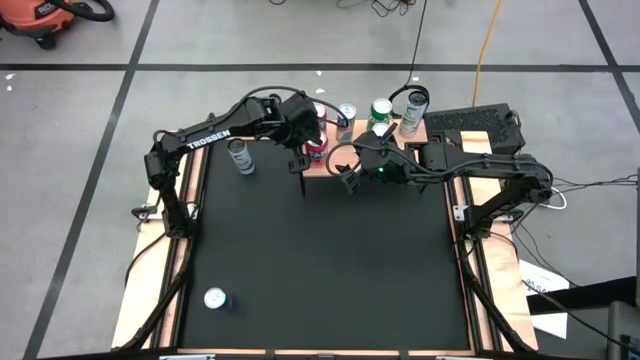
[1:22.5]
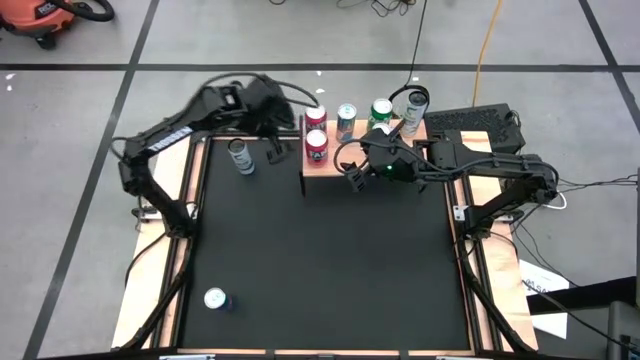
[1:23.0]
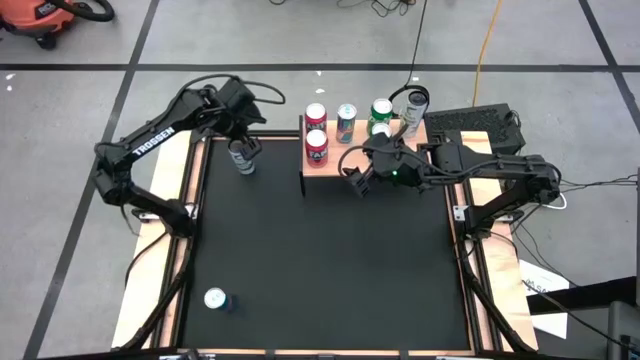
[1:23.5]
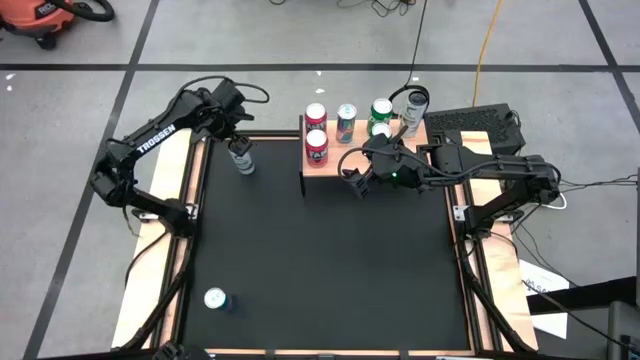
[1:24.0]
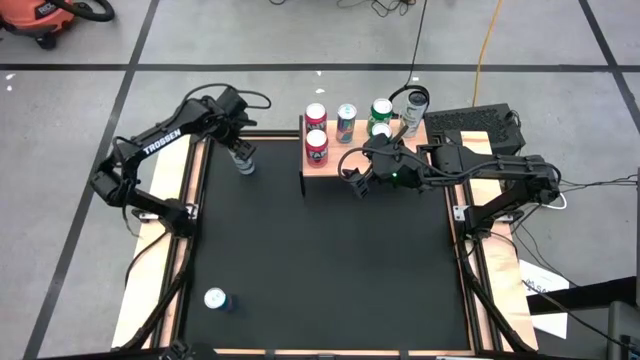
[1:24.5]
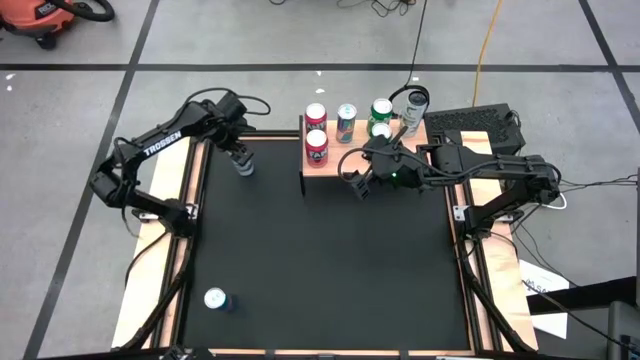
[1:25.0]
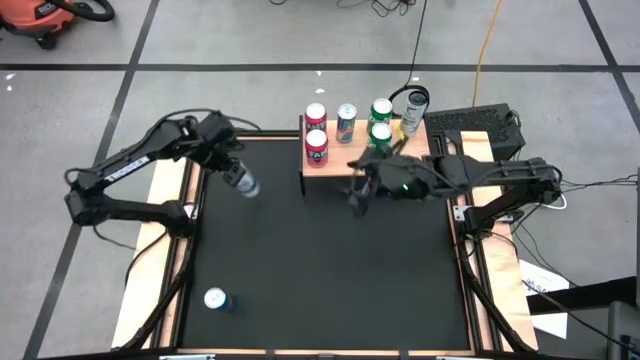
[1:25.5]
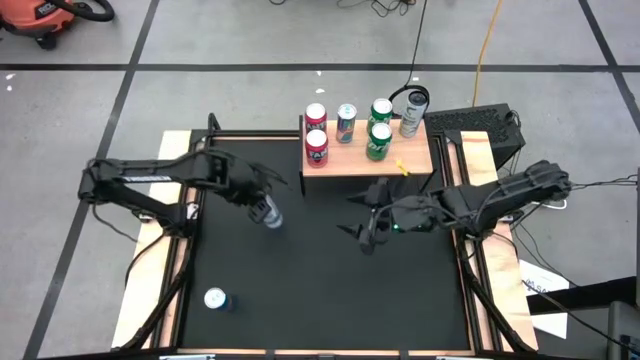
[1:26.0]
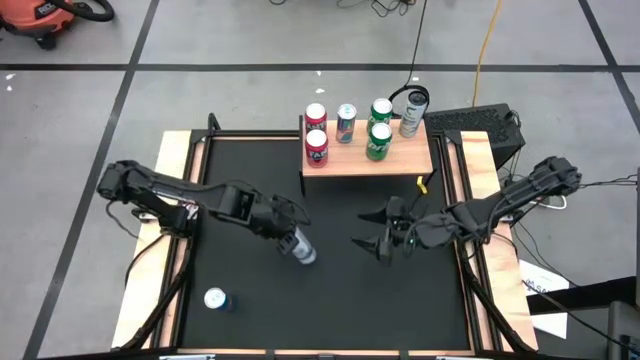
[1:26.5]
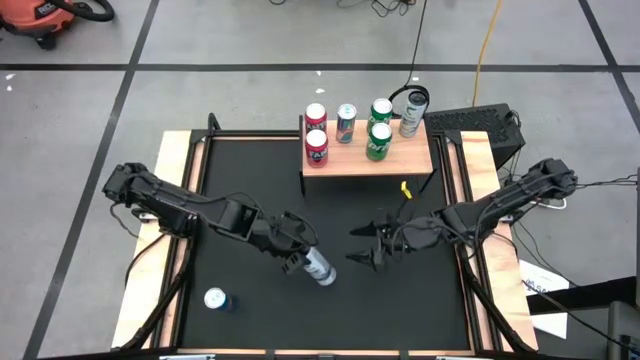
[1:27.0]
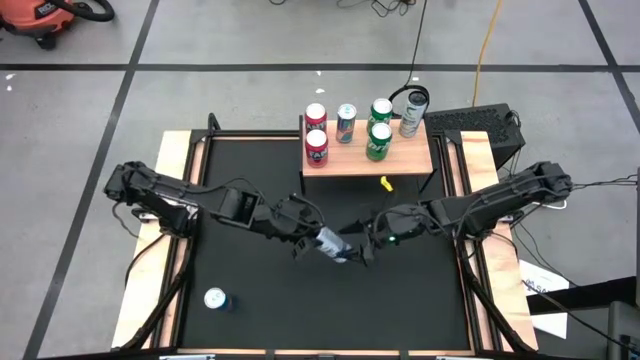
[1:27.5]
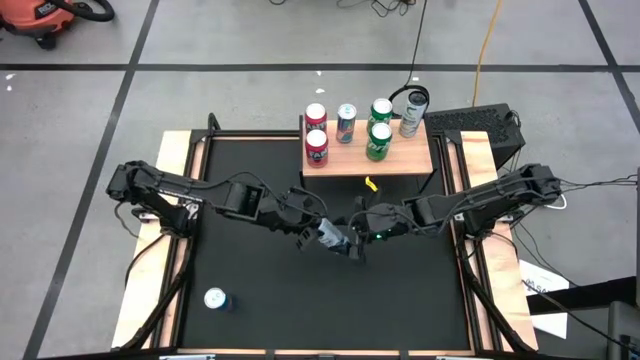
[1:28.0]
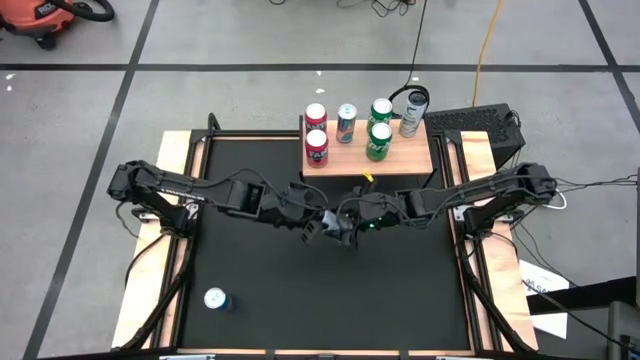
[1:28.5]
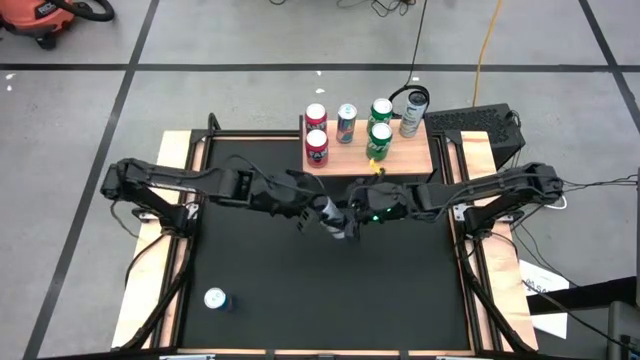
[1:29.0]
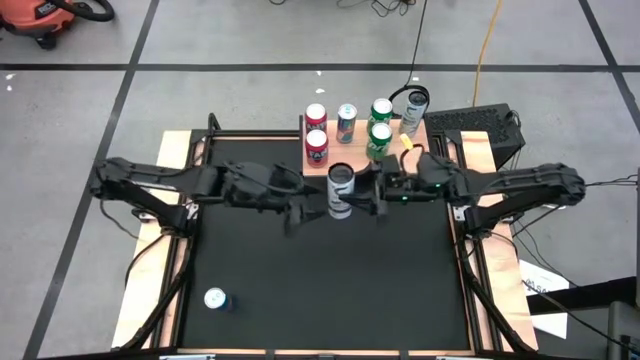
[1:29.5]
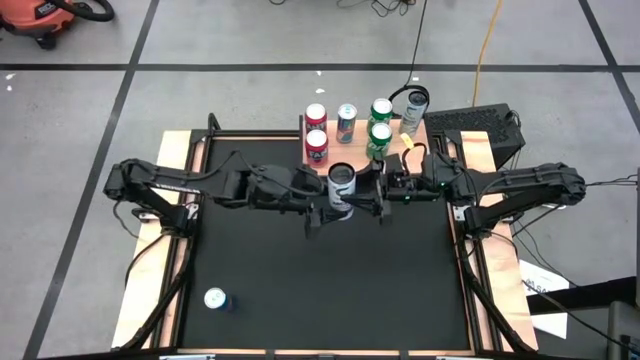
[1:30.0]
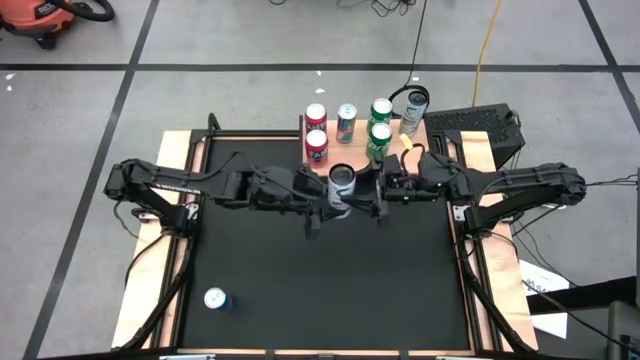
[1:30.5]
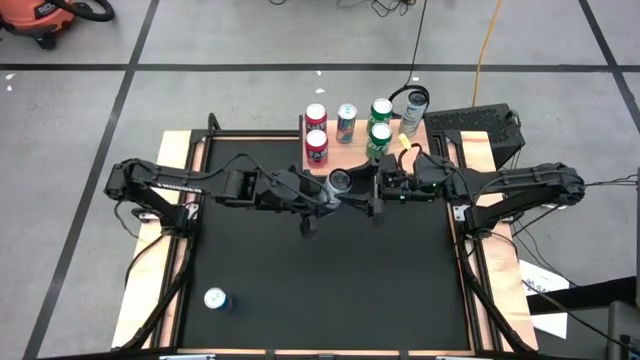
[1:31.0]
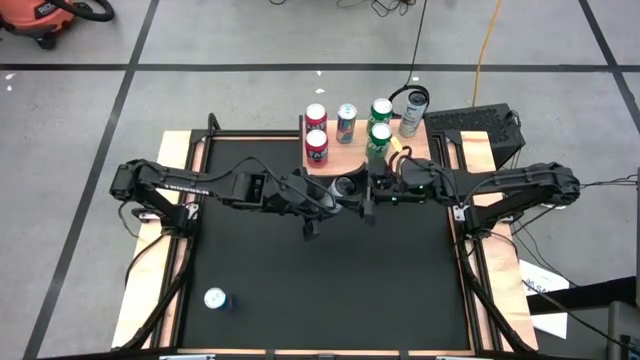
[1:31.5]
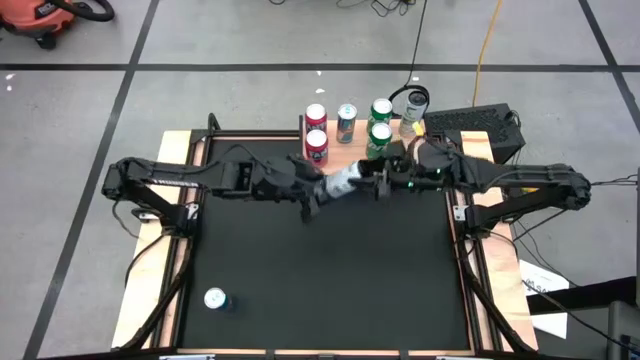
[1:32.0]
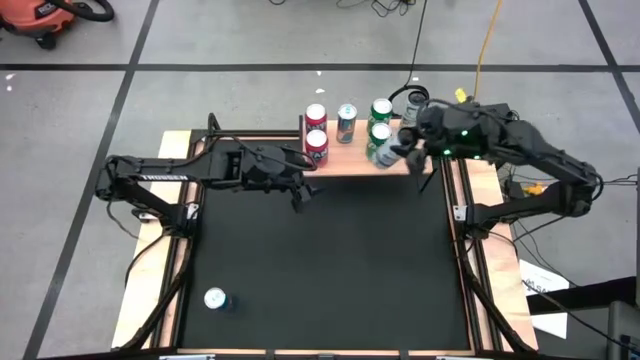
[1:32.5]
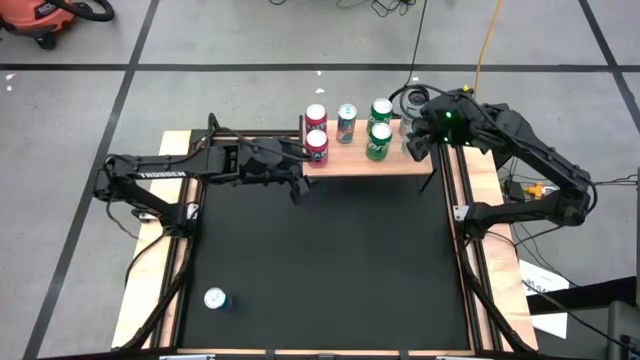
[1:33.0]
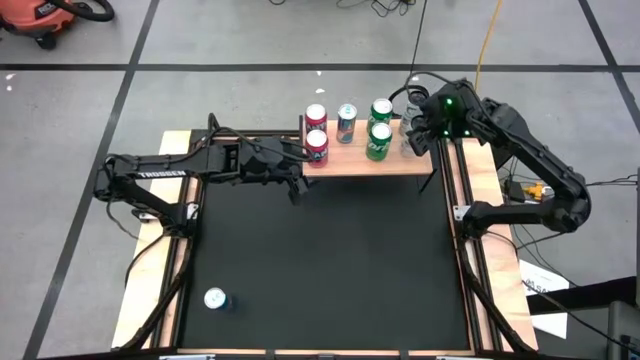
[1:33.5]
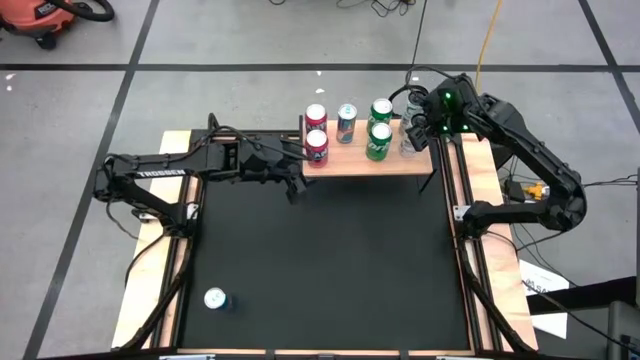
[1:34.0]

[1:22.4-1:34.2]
Task: Place canned beverage on shelf
Put the white blue soda can on the shelf aligned with the other white blue soda can

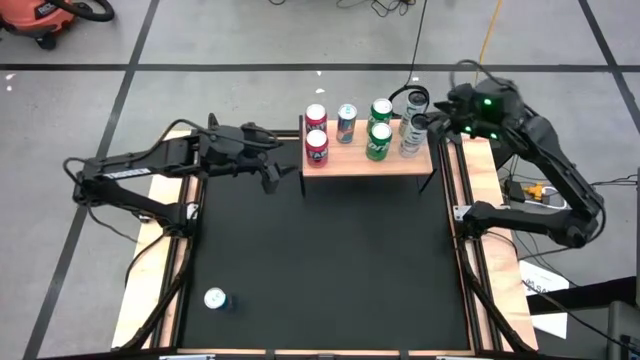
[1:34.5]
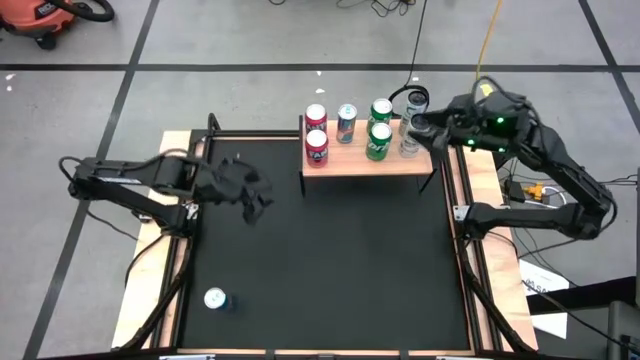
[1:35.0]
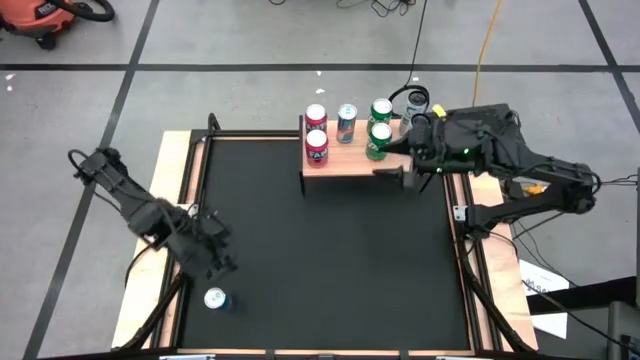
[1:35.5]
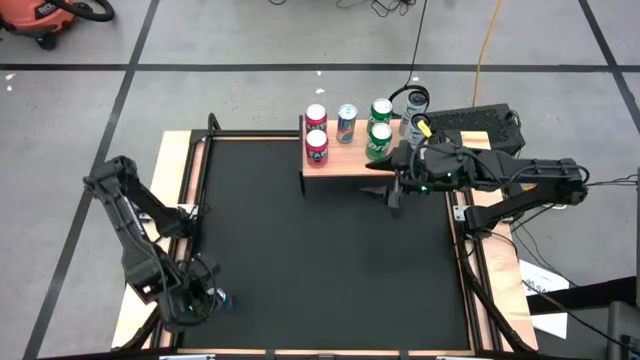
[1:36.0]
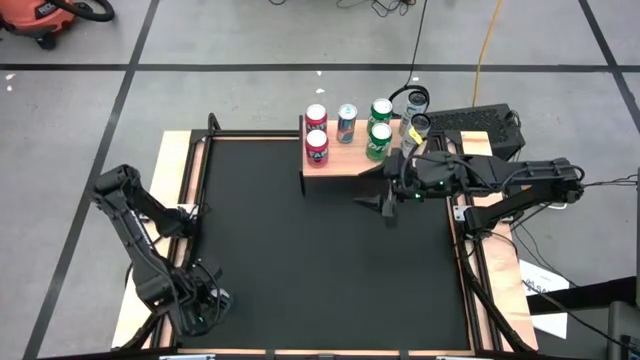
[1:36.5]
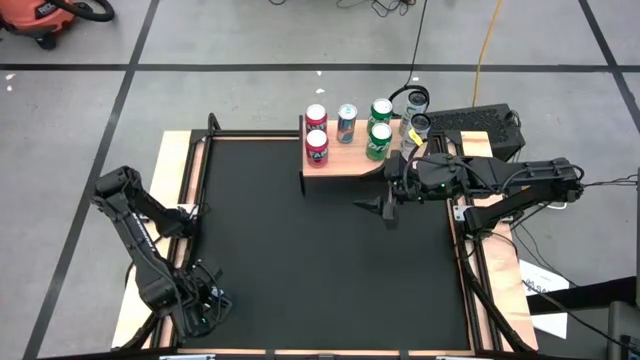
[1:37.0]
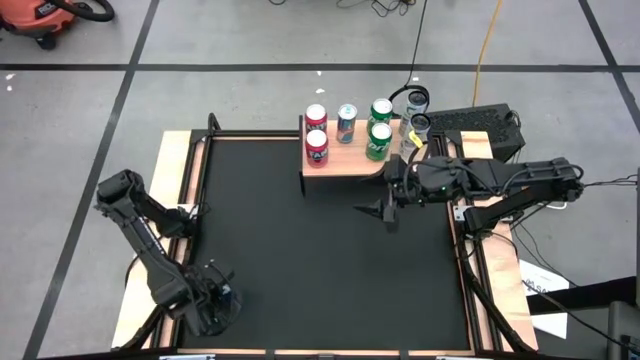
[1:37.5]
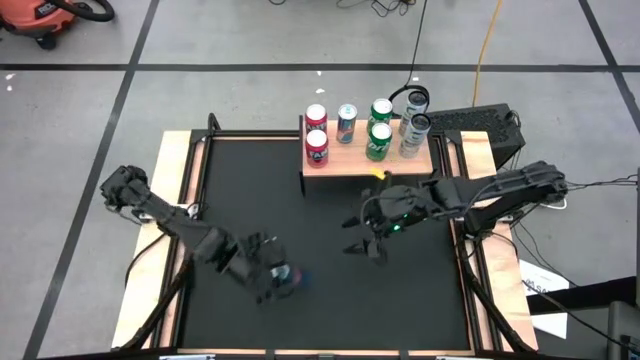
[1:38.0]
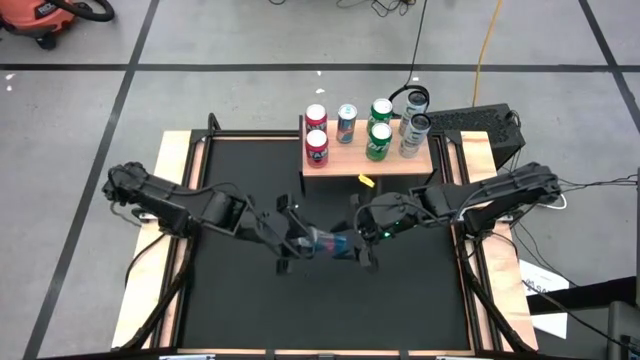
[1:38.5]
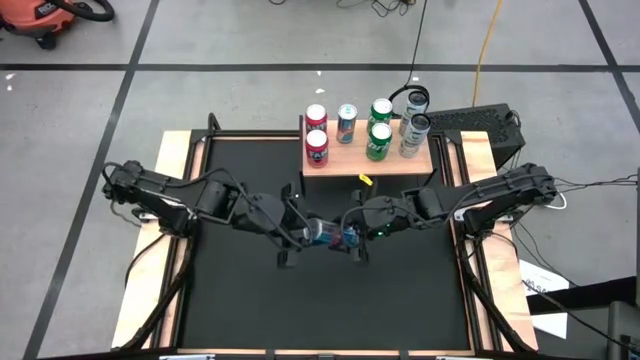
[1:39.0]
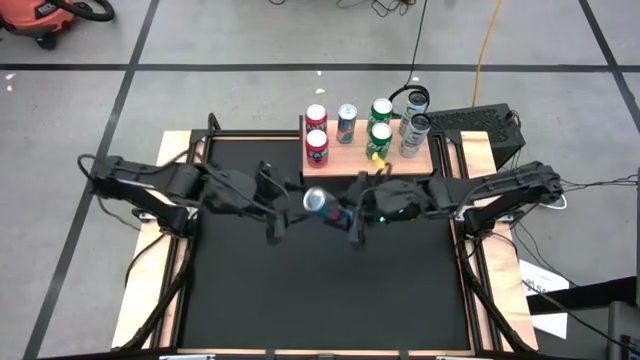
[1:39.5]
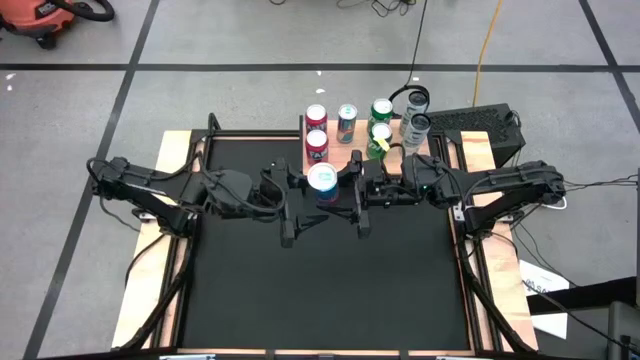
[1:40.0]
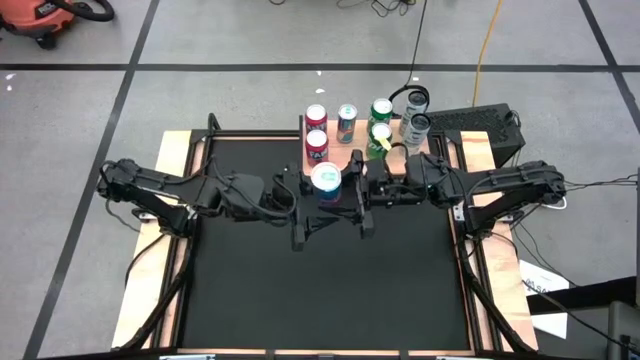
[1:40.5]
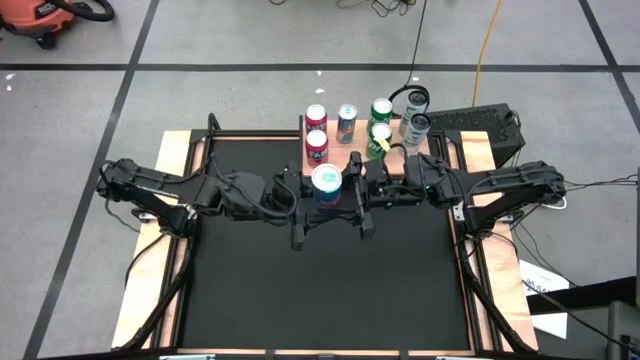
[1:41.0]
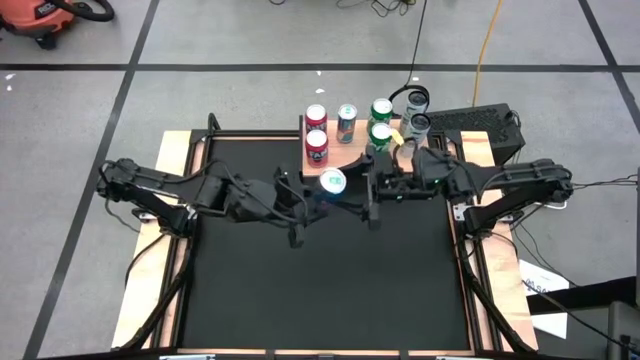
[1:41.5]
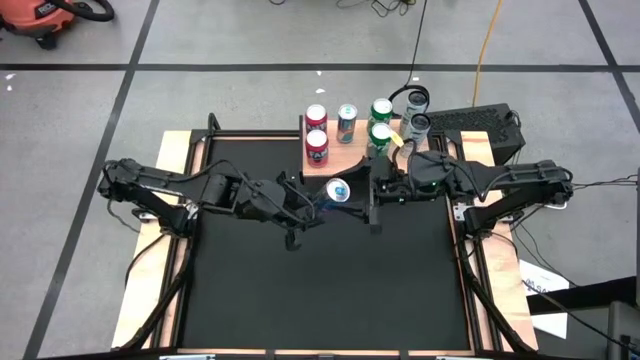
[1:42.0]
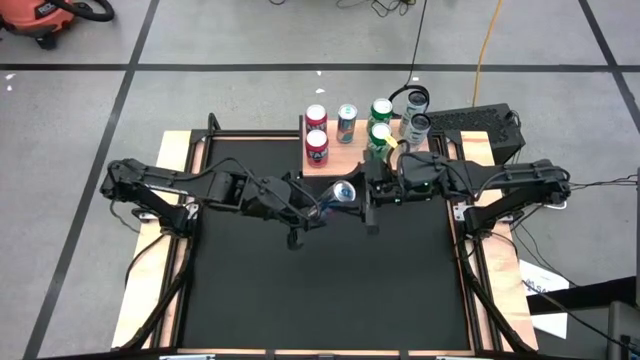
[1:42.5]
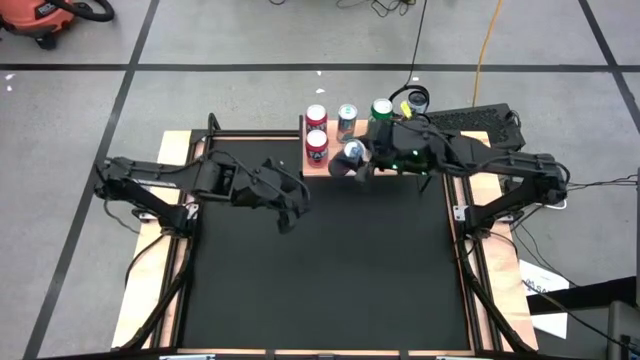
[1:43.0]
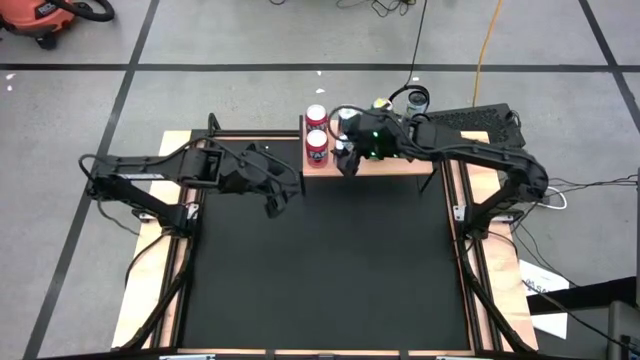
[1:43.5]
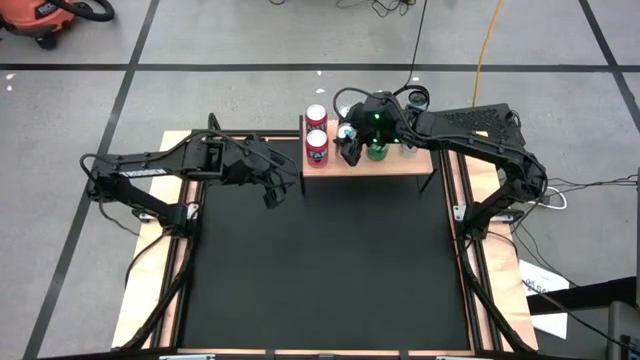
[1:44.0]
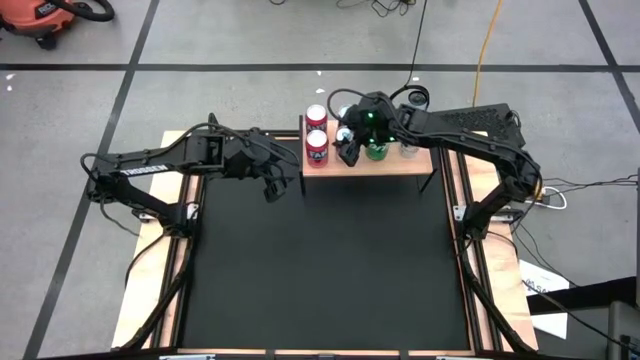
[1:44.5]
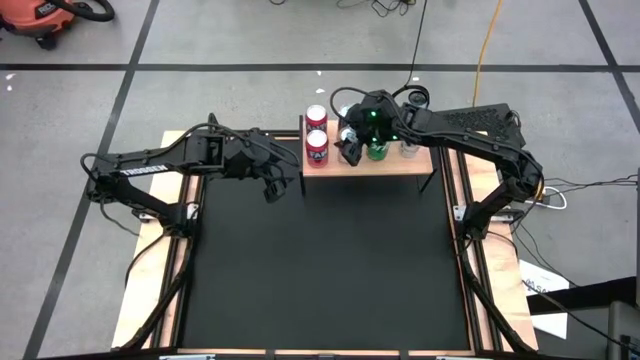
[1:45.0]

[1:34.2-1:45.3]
Put the blue soda can on the shelf aligned with the other blue soda can
